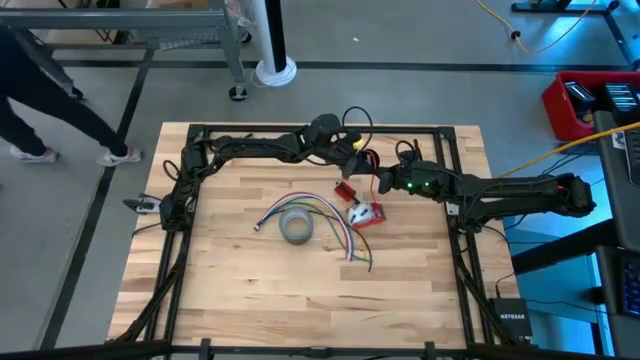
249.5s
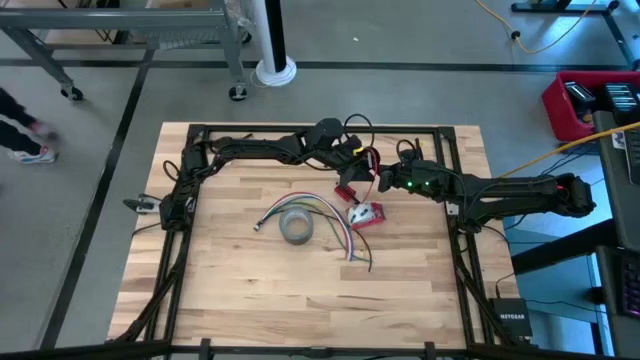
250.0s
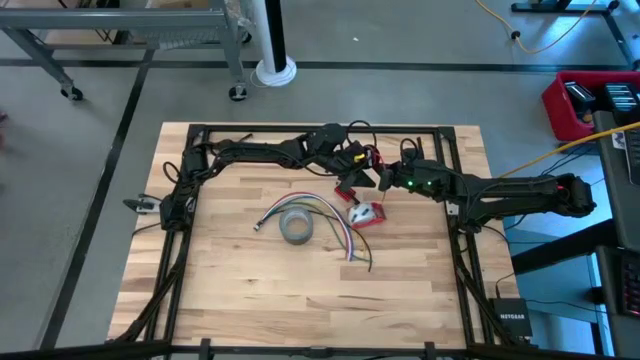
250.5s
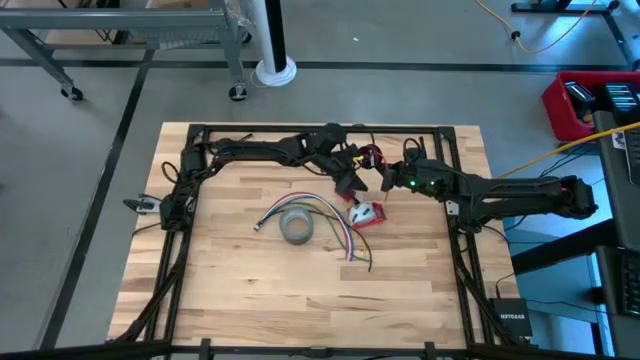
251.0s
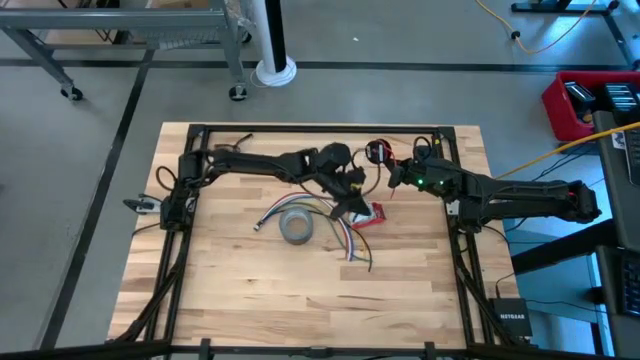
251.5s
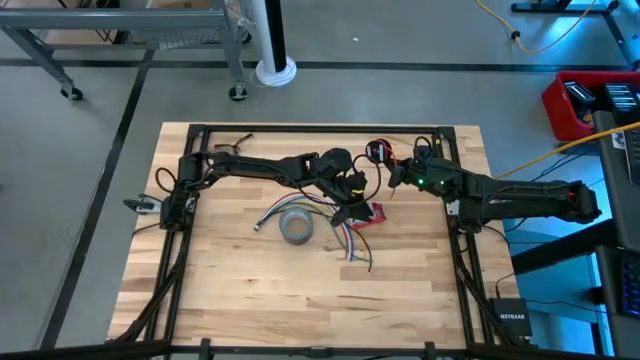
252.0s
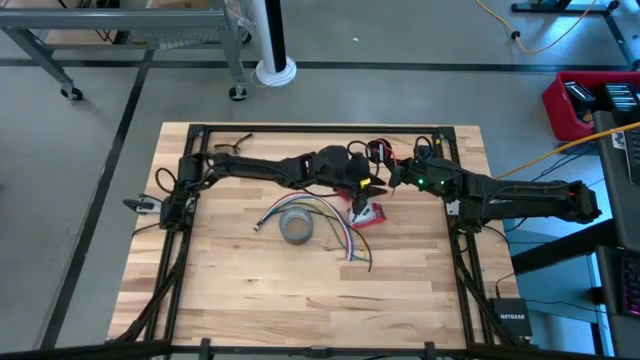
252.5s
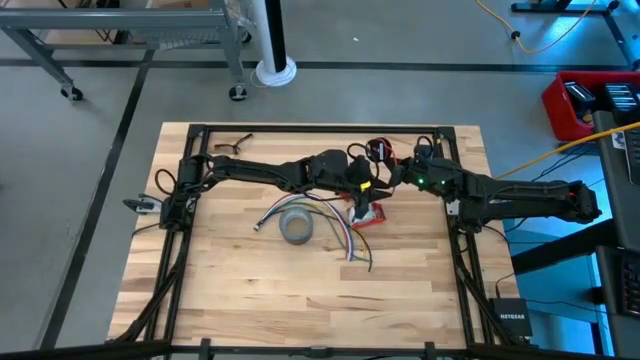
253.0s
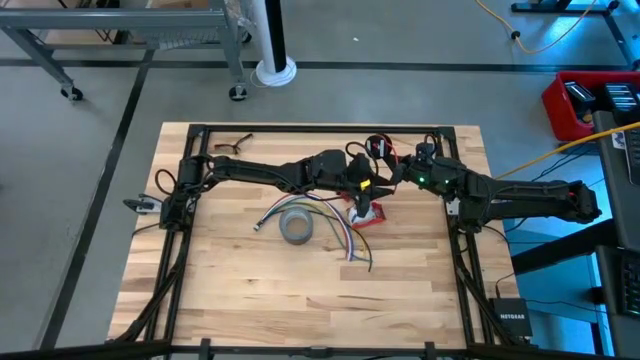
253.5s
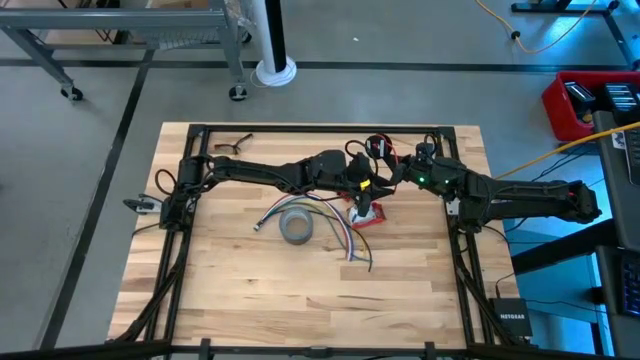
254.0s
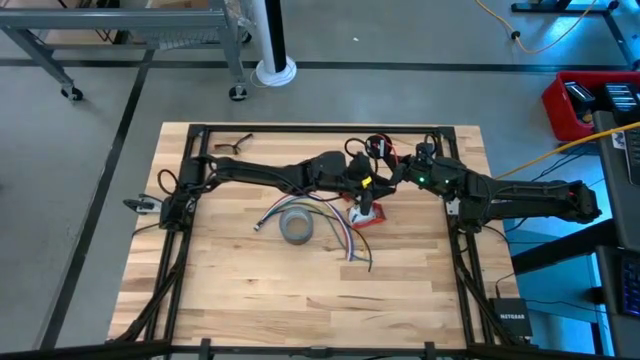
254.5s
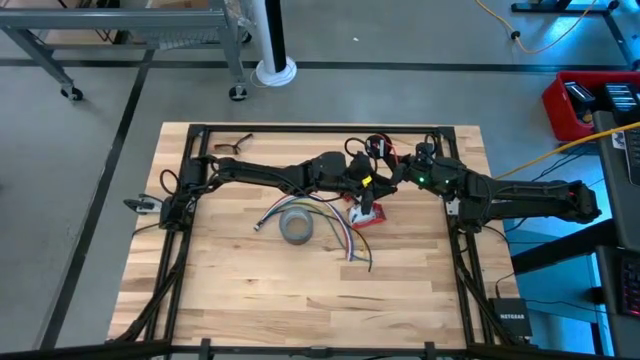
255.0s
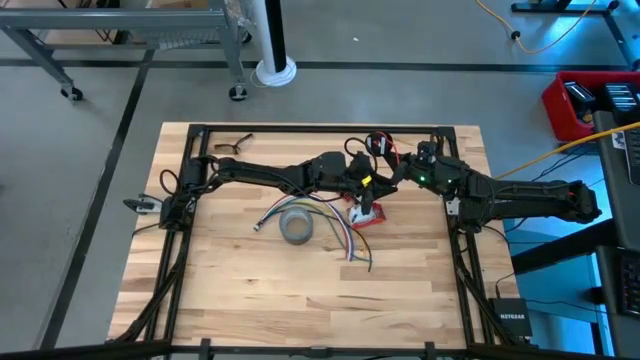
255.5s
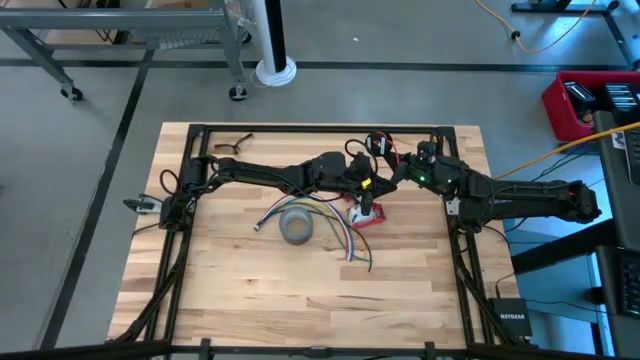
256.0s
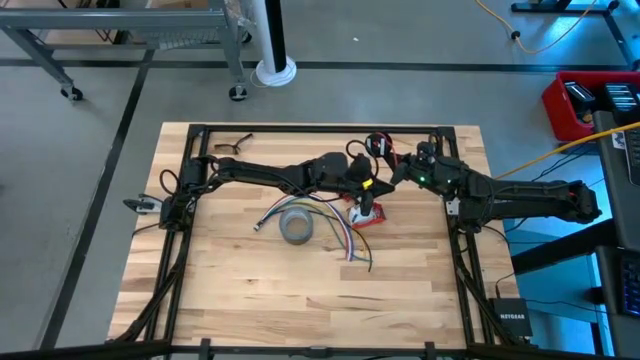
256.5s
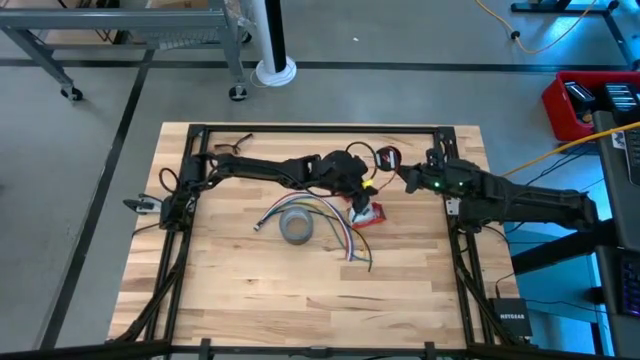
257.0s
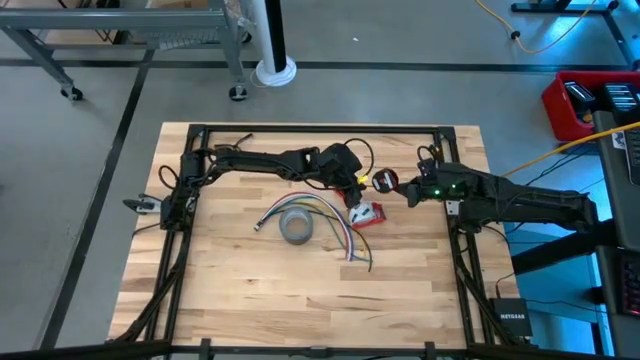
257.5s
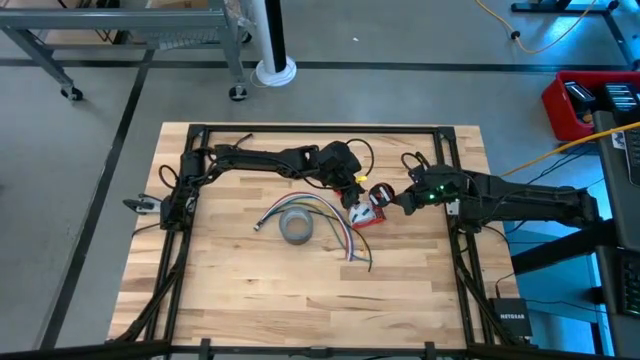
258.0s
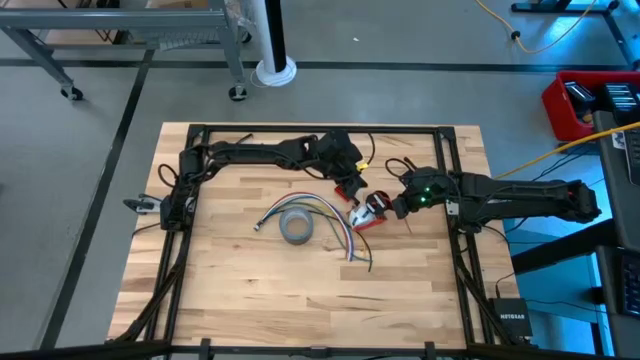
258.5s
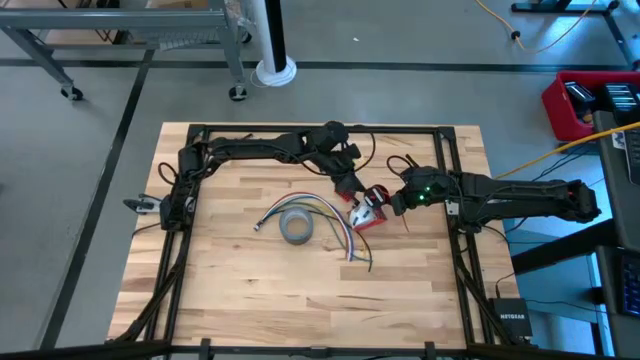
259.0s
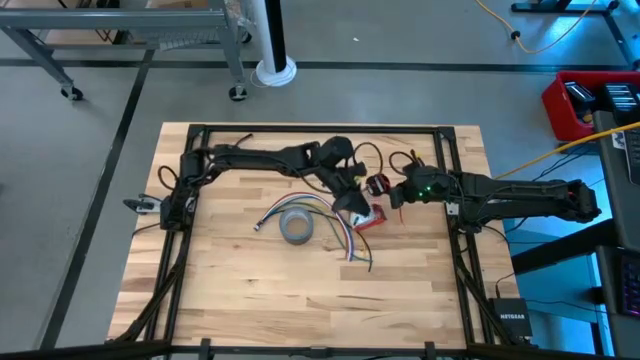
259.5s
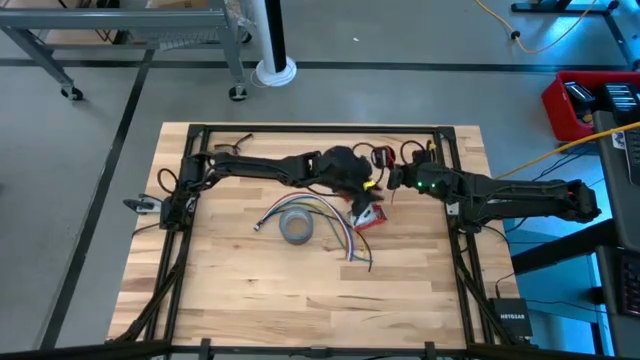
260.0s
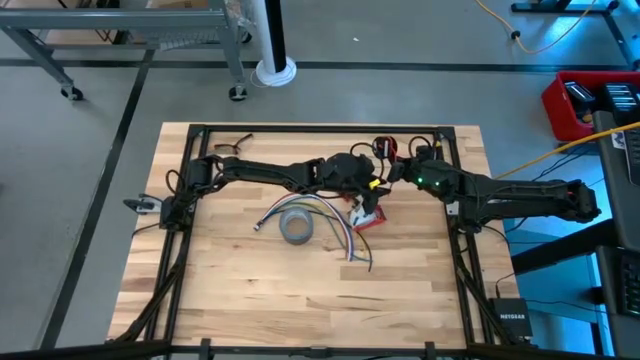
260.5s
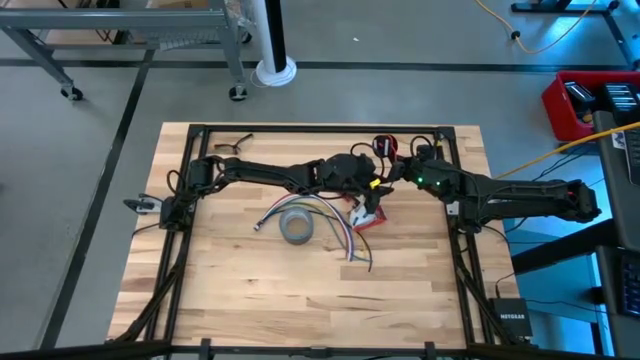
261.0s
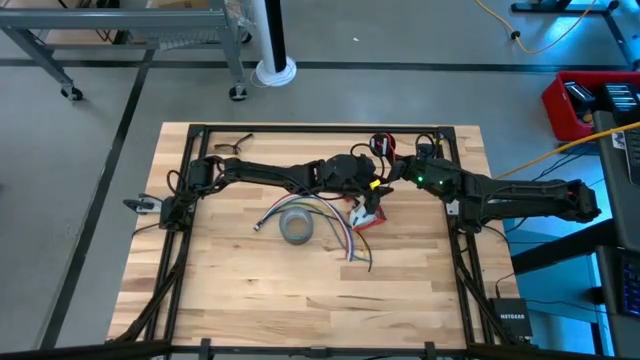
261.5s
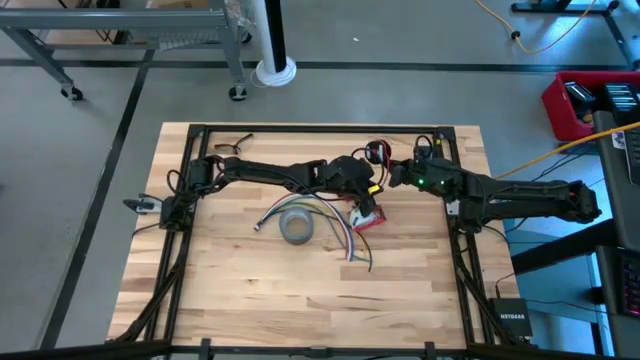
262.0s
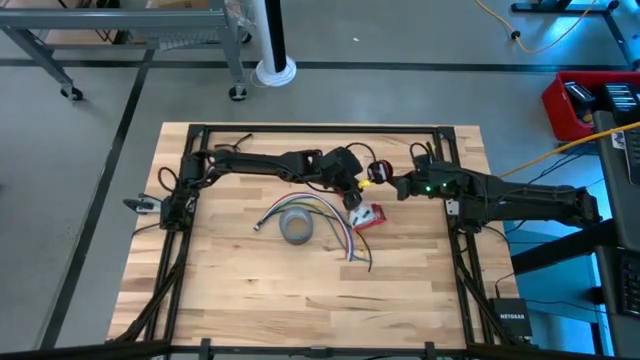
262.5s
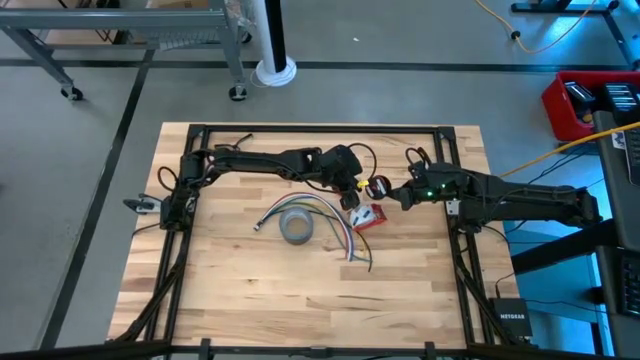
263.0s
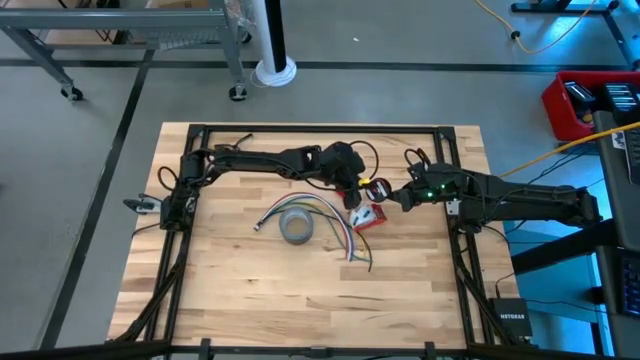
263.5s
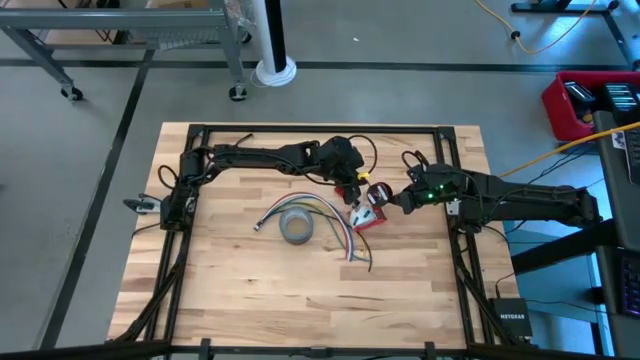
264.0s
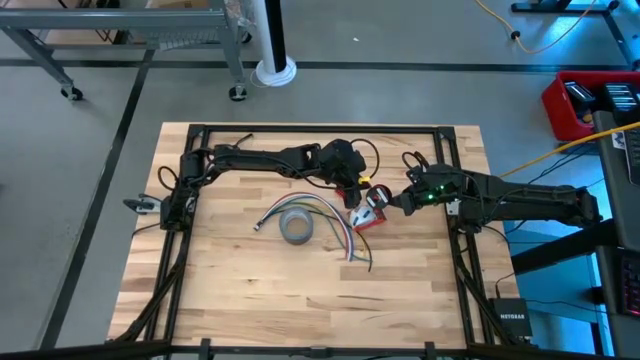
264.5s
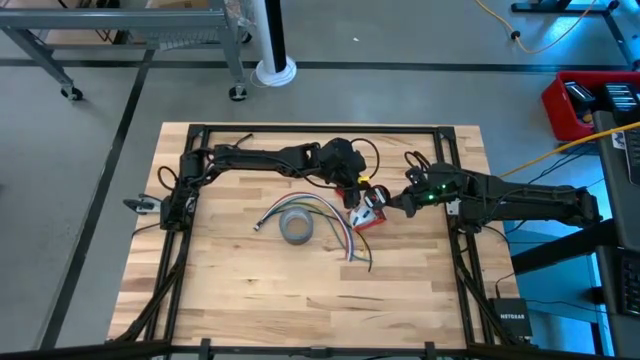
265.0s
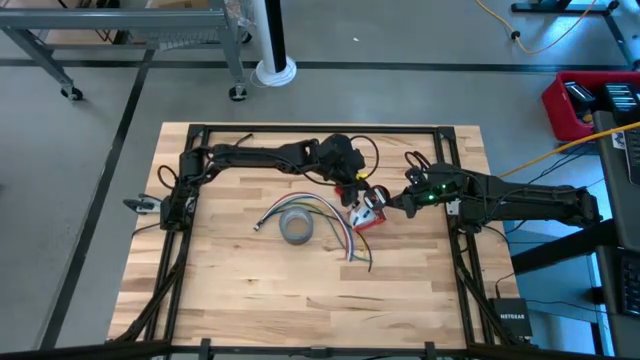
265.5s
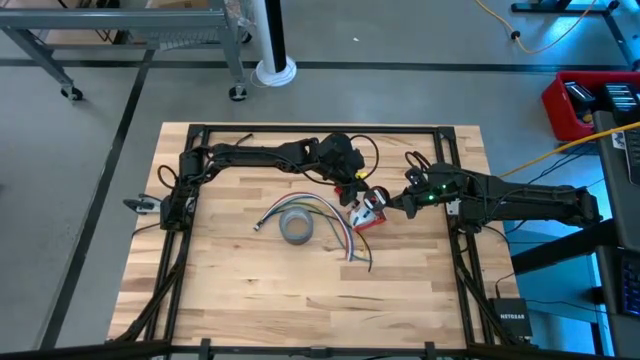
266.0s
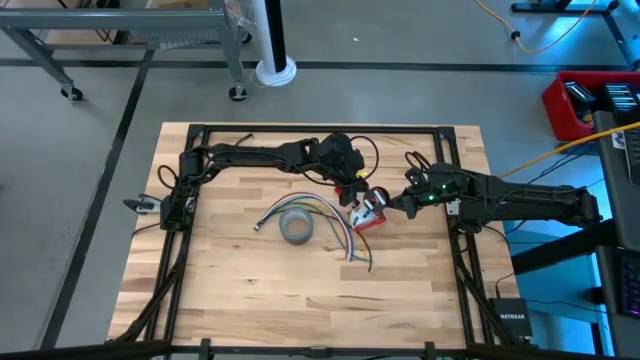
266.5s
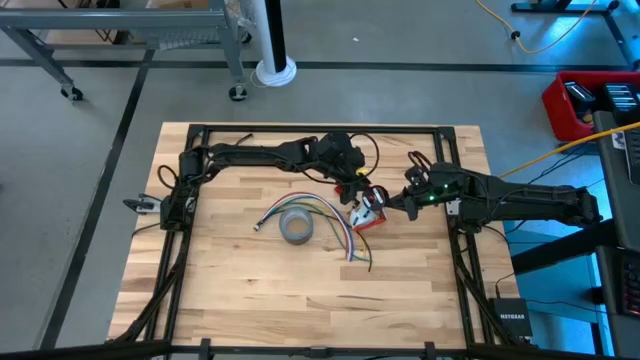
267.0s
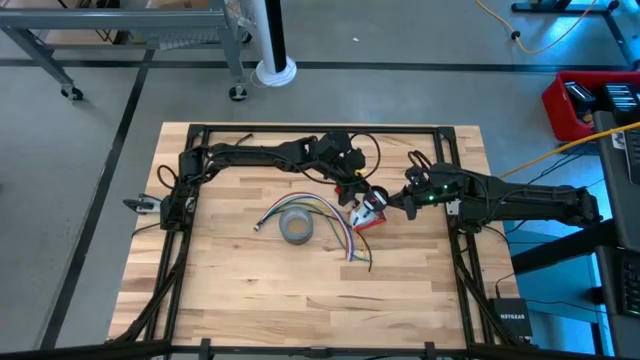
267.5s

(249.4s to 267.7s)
Task: Coil cords
Coil the red wire on the black spool

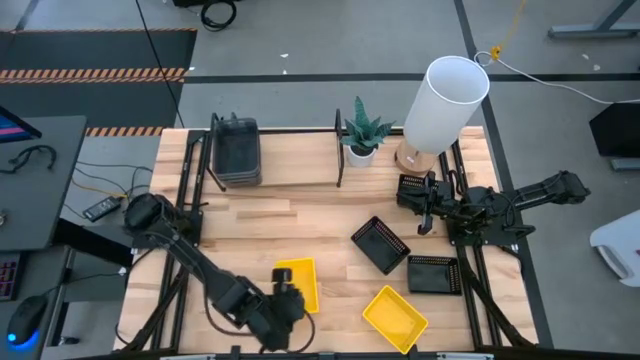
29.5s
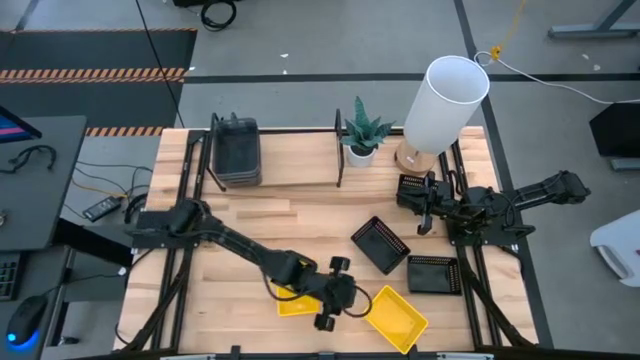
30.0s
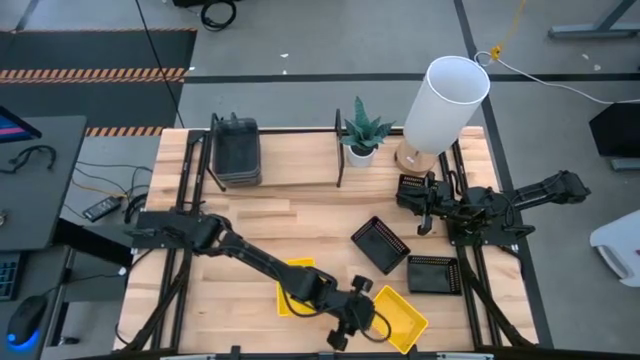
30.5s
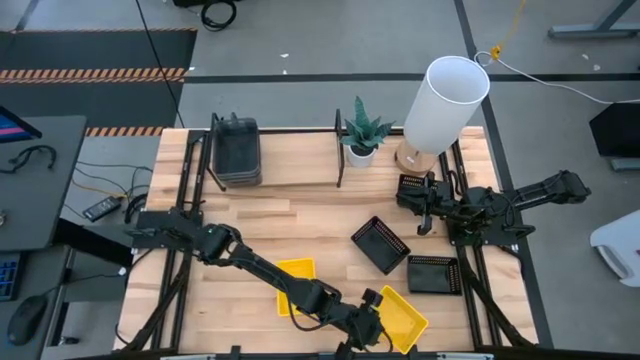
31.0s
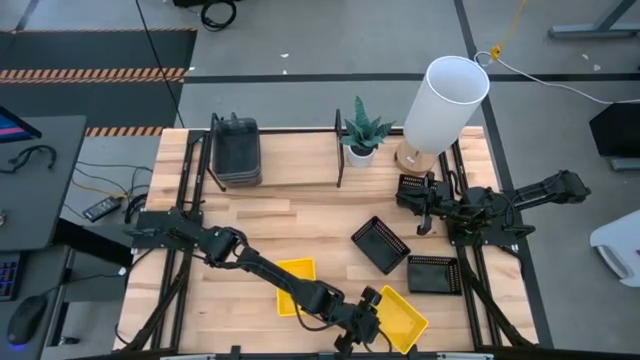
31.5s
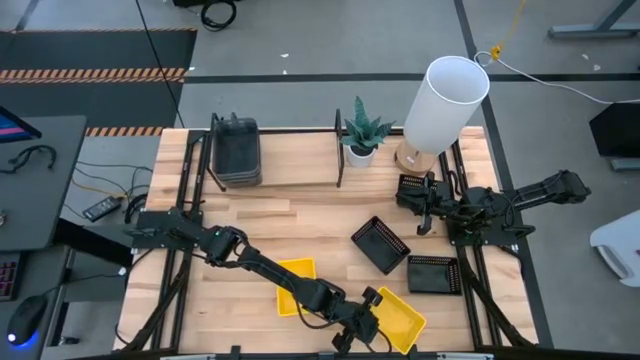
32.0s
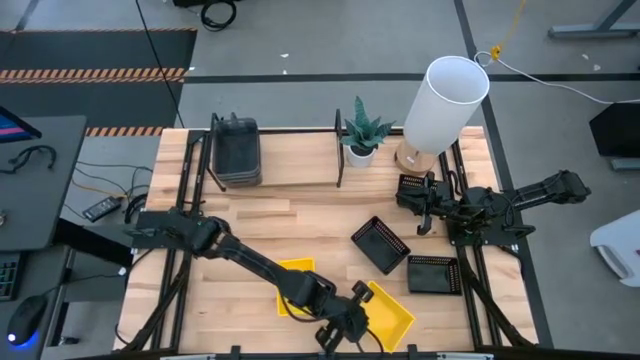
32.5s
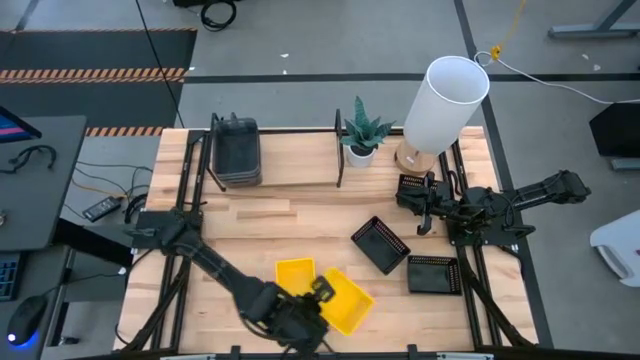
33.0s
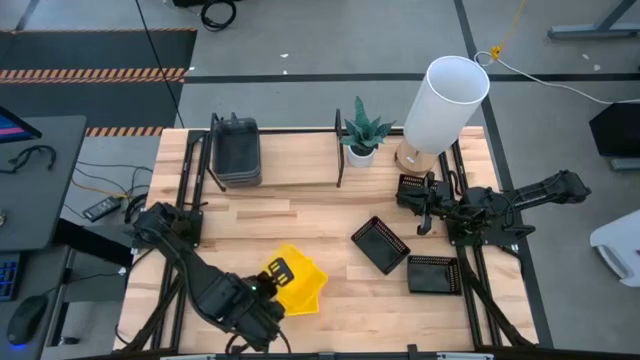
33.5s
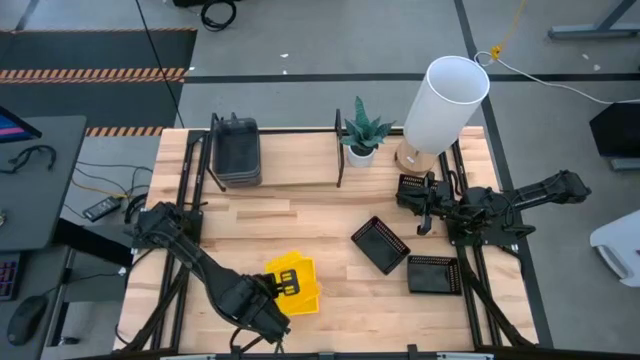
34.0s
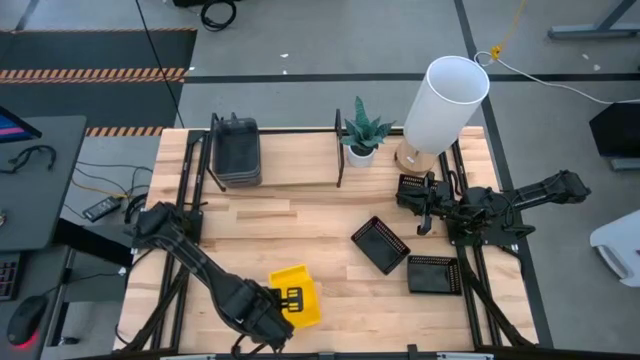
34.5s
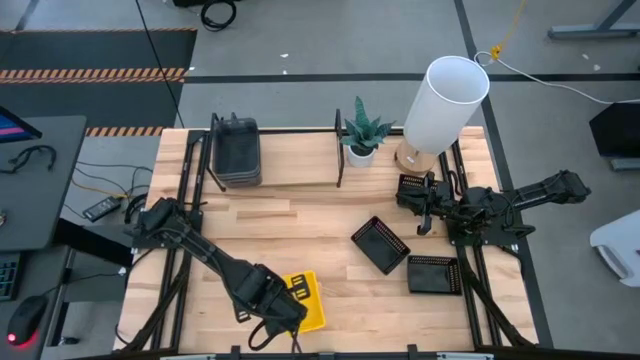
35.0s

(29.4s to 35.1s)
Task: Stack baskets on shelf by color
Stack the right yellow bin on the left yellow bin
